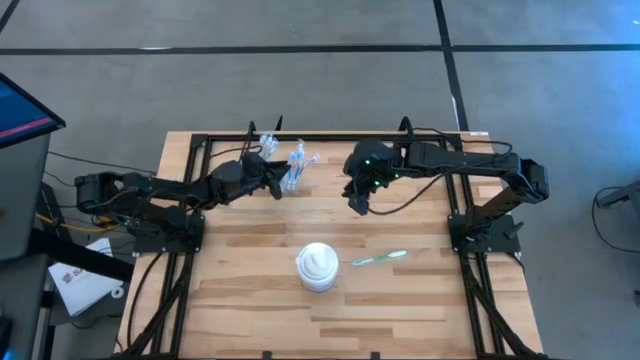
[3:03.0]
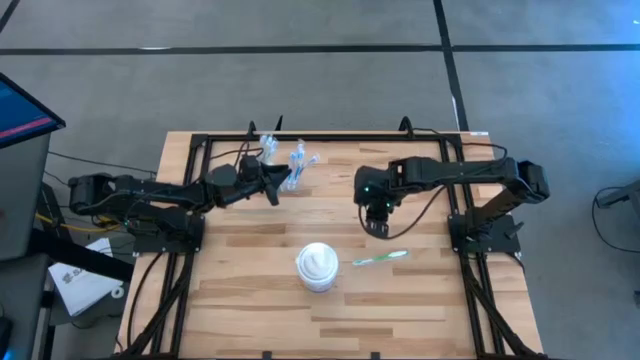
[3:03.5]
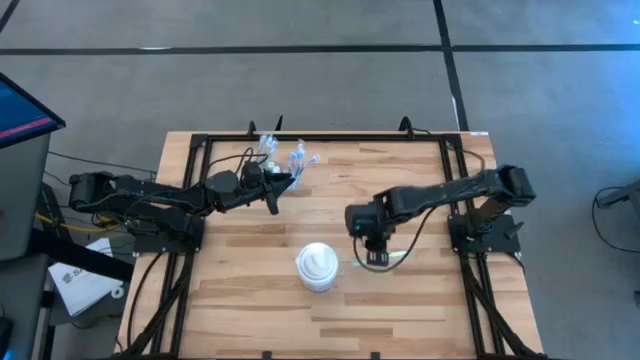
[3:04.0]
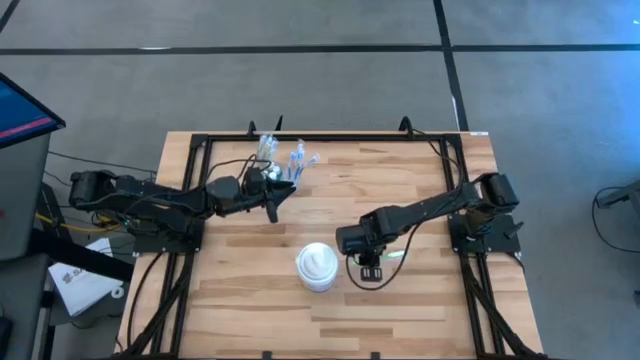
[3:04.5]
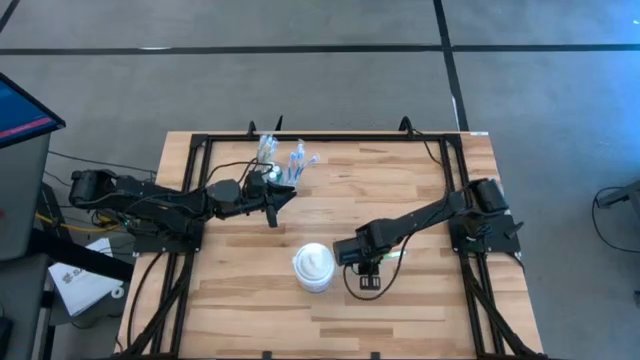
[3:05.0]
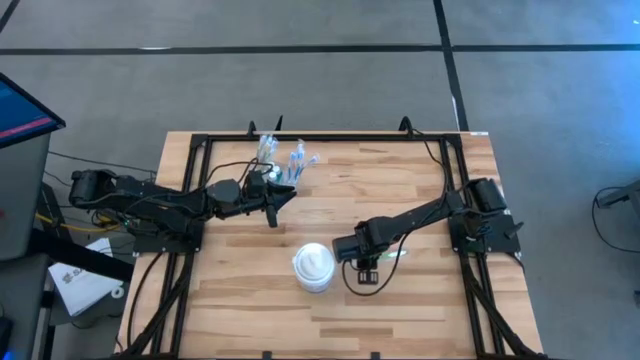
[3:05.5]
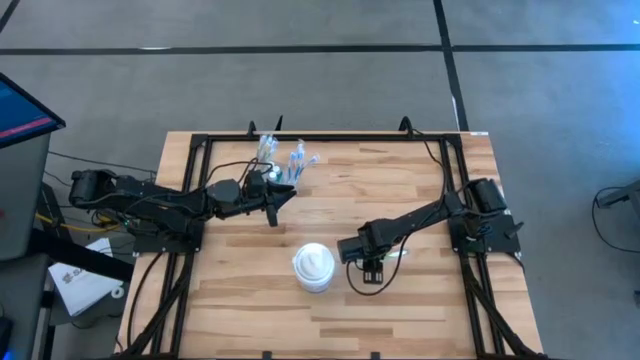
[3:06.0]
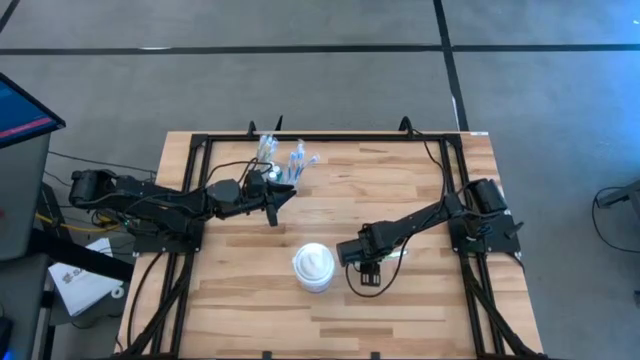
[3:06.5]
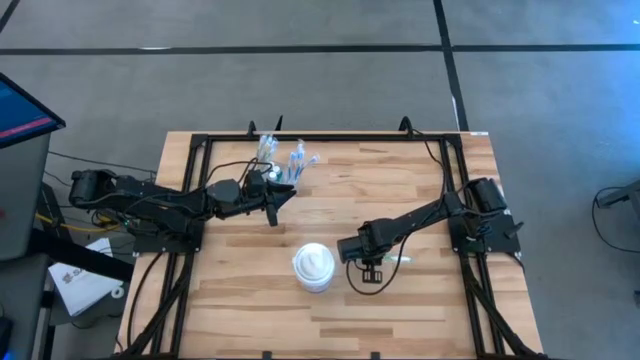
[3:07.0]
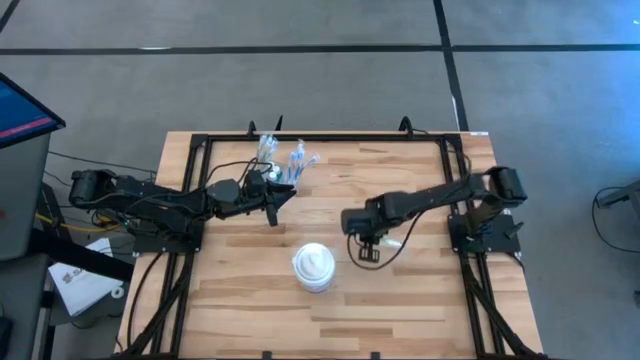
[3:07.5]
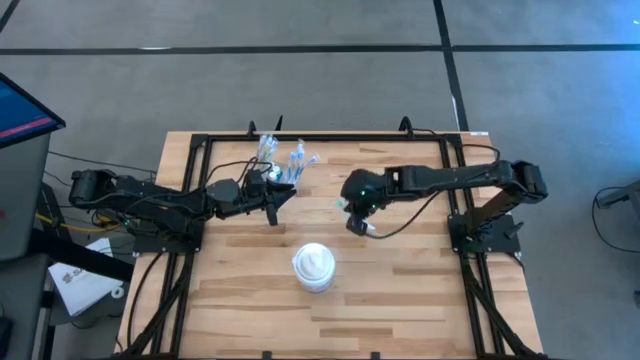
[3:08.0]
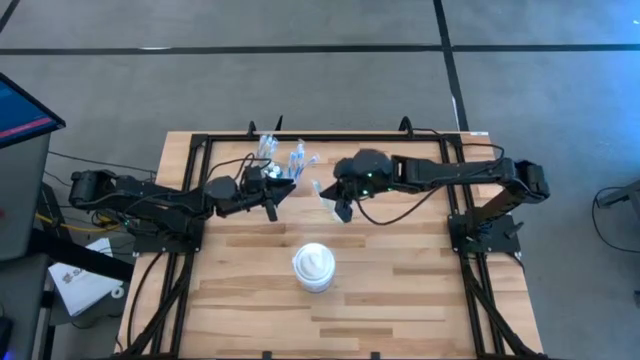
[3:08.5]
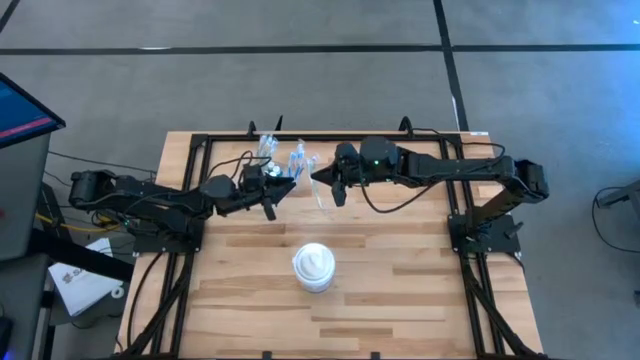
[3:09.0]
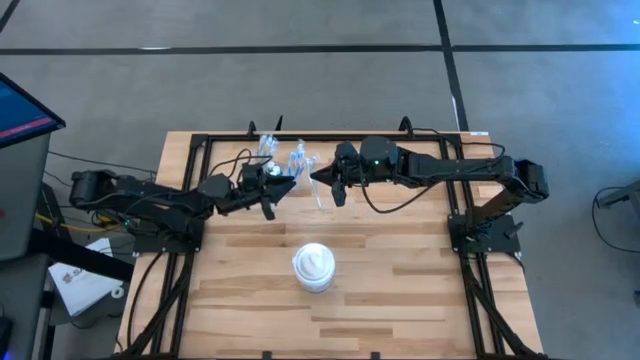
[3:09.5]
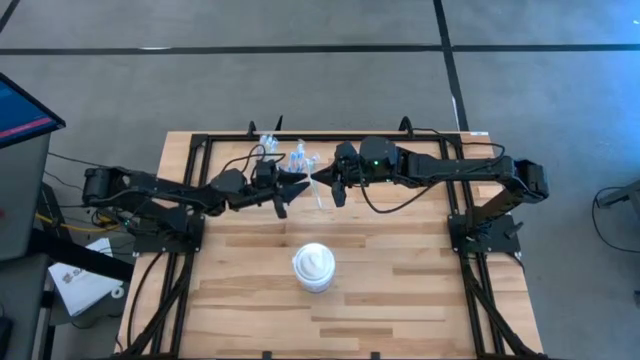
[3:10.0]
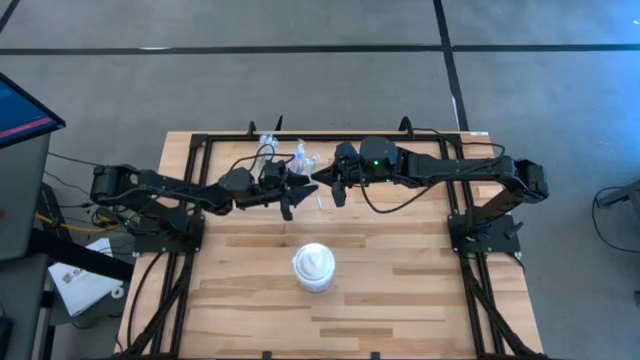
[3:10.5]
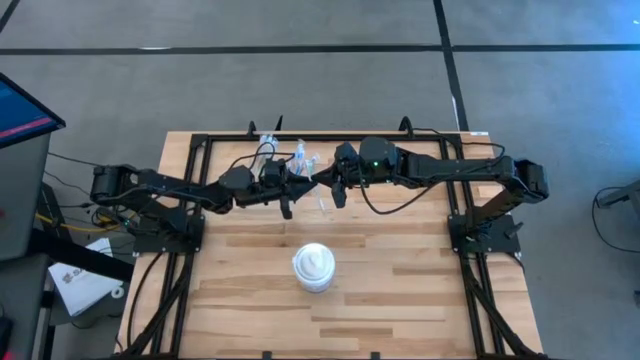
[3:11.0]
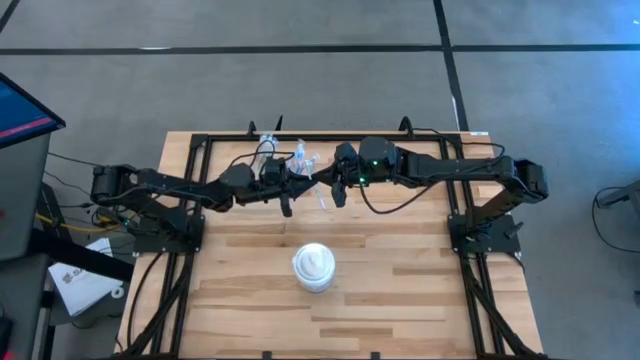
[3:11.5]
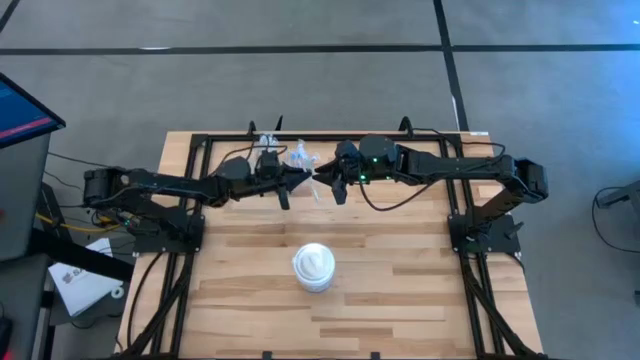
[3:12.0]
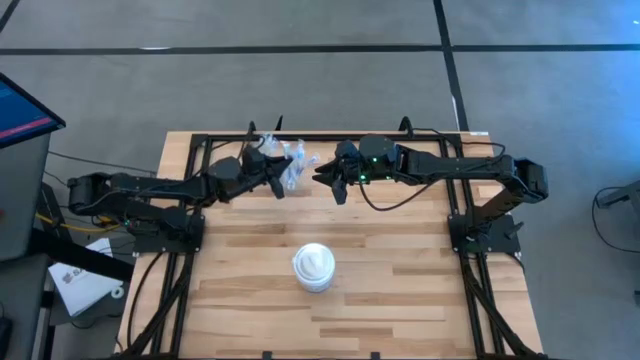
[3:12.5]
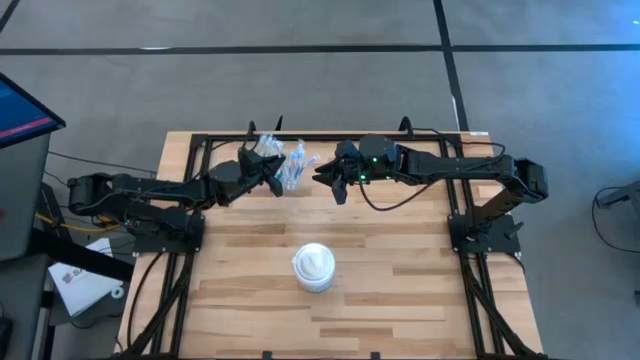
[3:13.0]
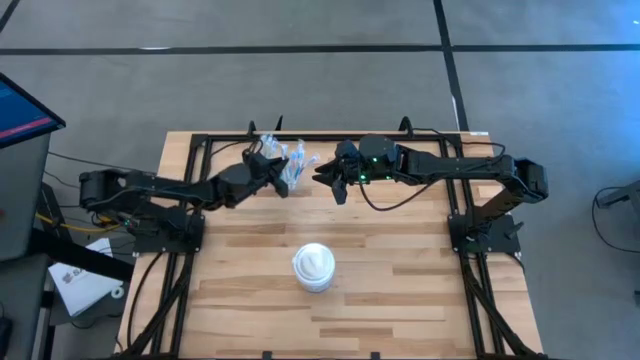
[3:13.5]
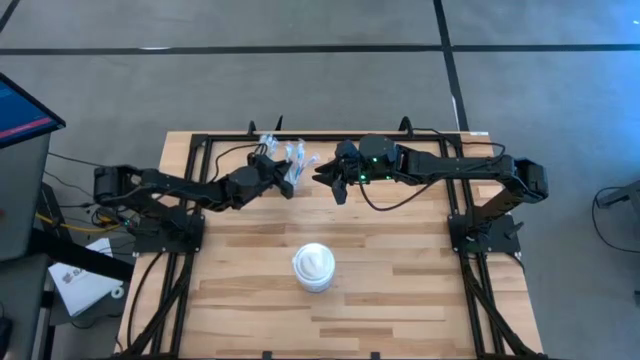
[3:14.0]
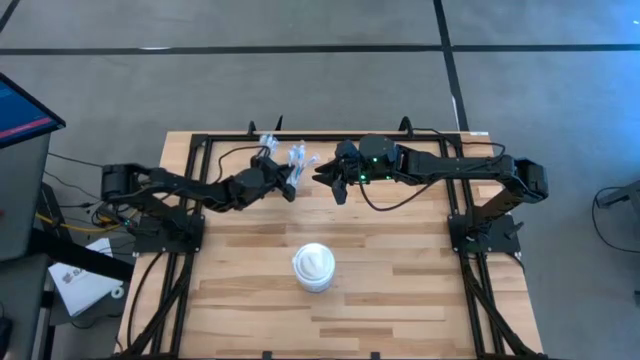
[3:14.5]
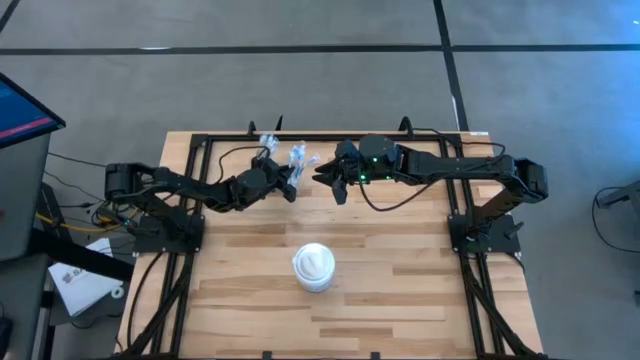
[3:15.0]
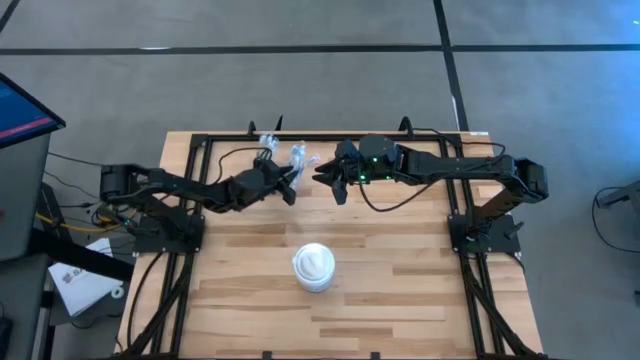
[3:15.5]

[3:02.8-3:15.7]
Task: Pick & Place toothbrushing station
Put the green toothbrush into the transparent organizer

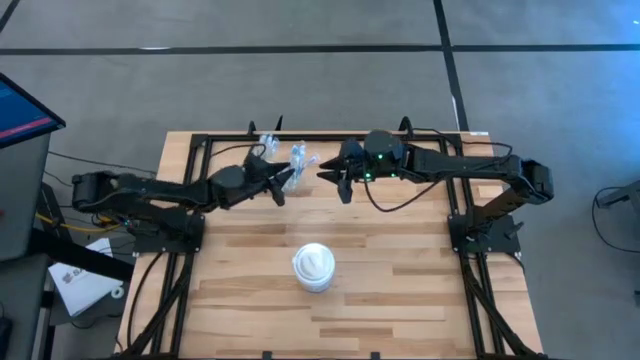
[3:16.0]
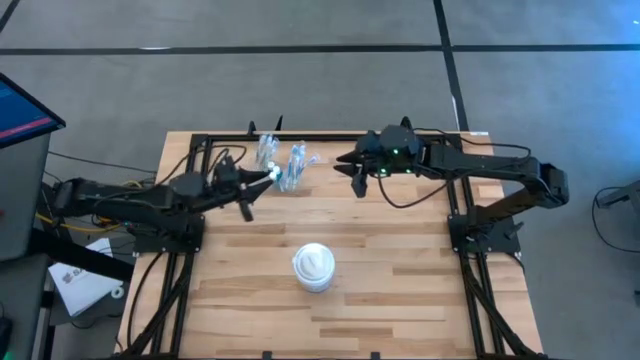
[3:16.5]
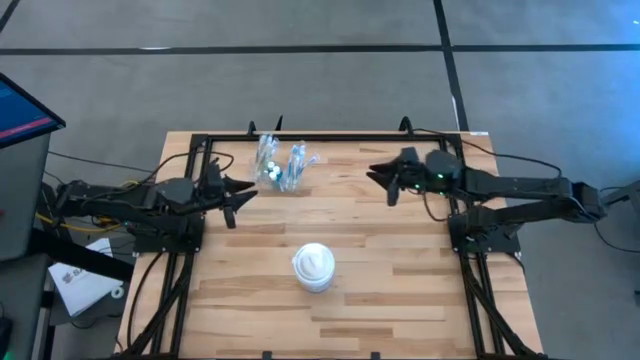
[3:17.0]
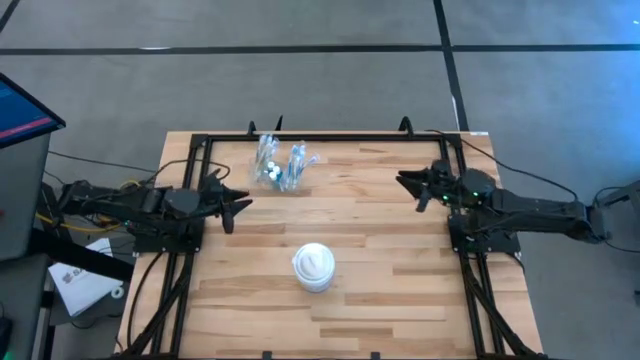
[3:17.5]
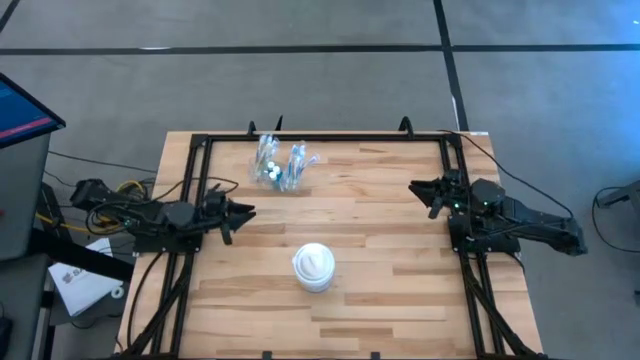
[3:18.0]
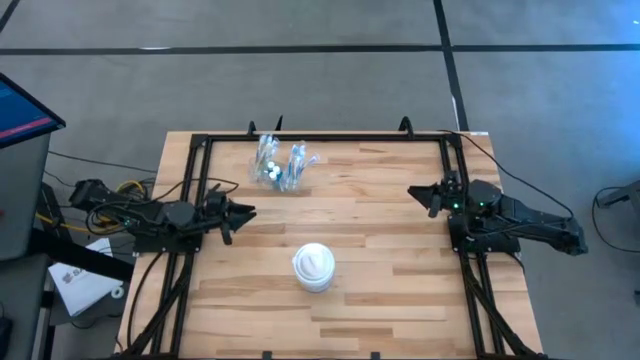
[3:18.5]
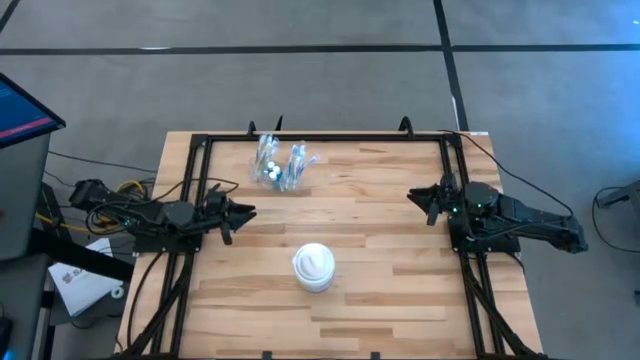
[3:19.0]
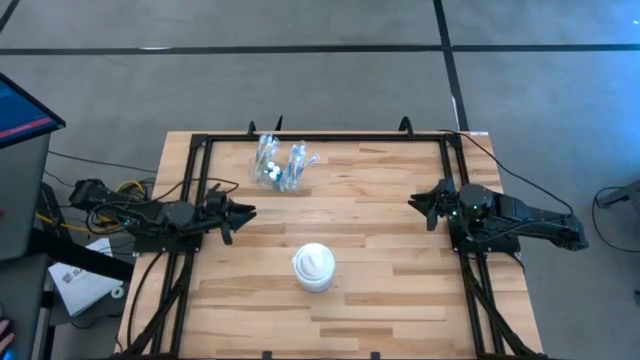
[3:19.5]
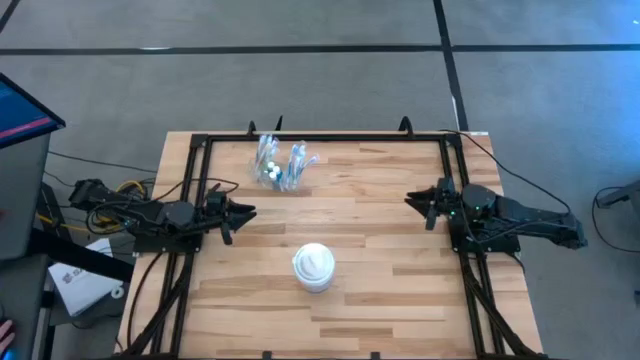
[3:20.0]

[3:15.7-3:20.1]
Return to Home Position

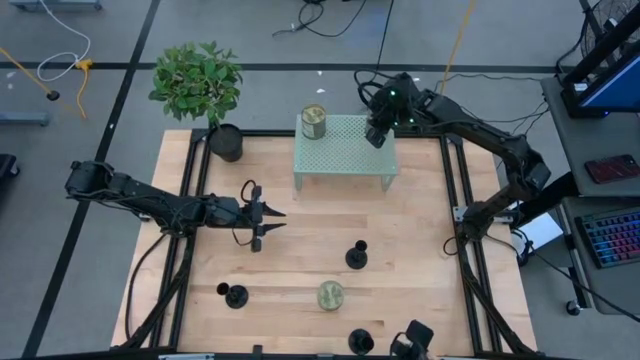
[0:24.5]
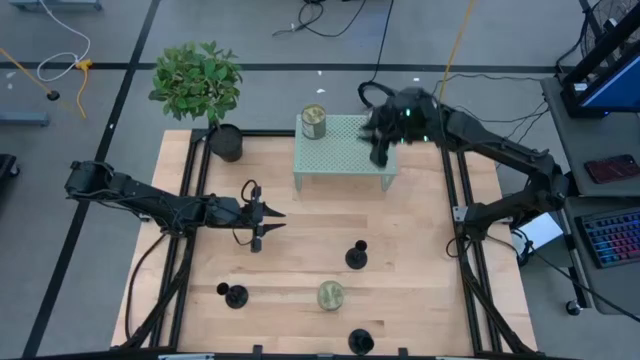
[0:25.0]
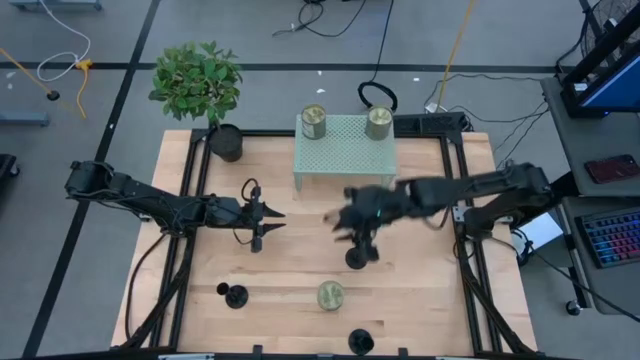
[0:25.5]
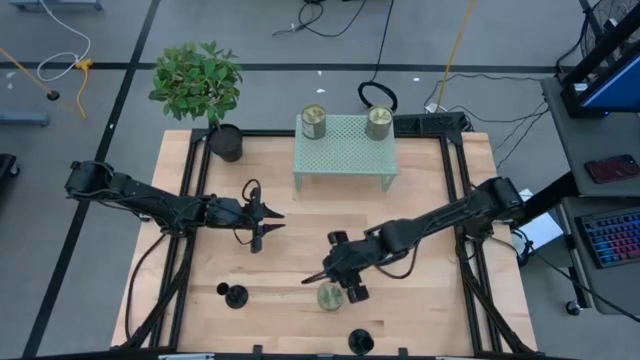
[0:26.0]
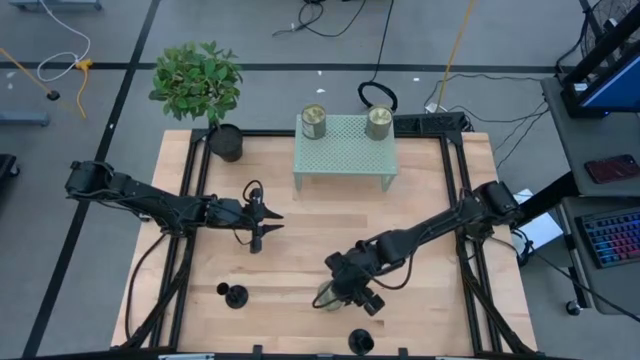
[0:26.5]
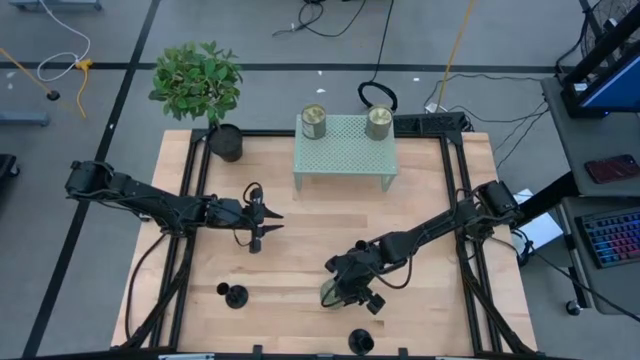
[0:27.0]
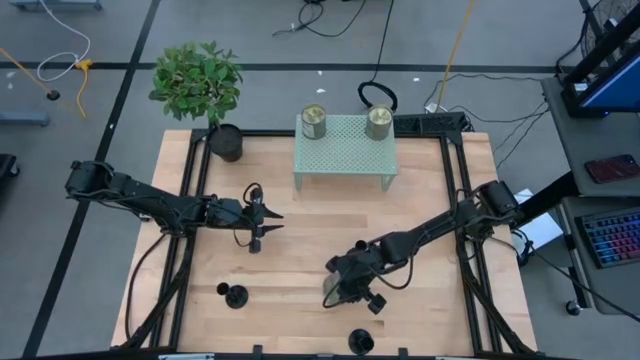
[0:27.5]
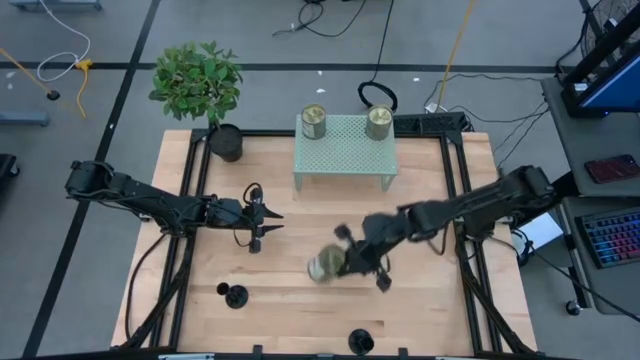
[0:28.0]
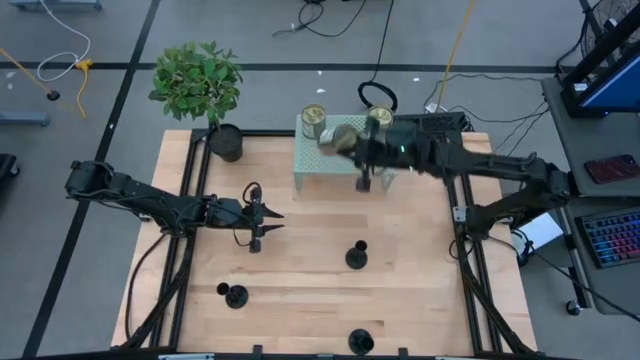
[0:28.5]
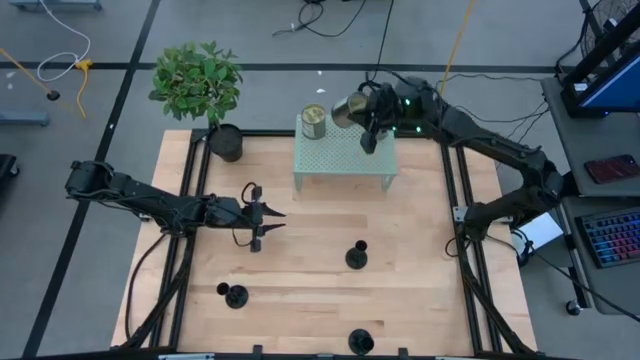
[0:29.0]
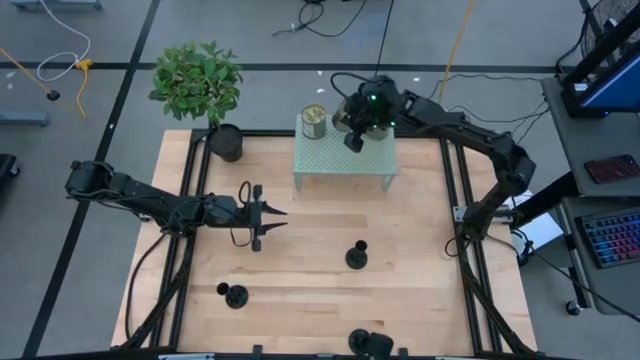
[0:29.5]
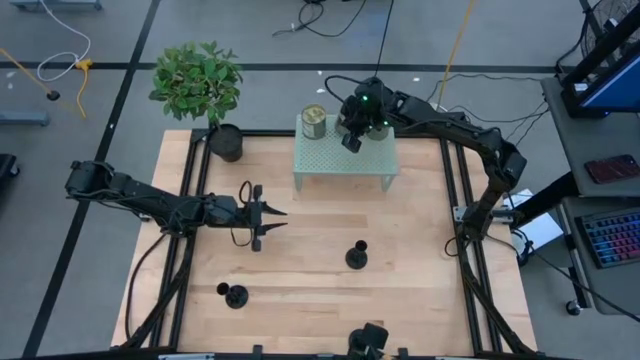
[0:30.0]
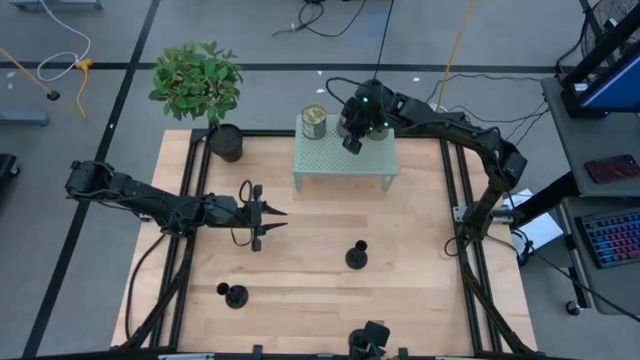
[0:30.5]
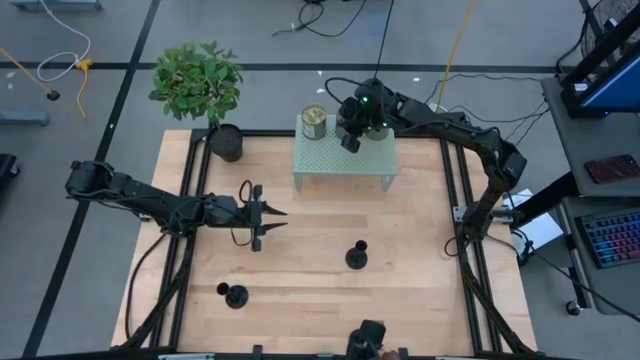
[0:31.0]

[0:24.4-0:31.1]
Task: Pick & Place candle stick holders
Put the silver scented candle on the shelf aligned with the other silver scented candle
